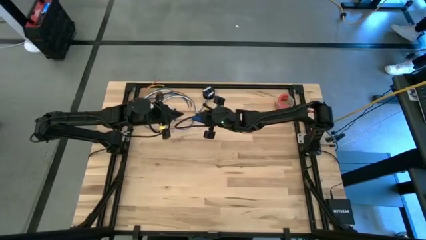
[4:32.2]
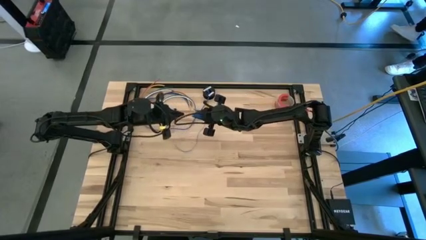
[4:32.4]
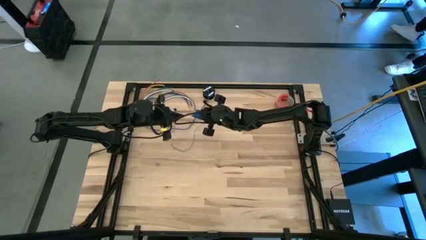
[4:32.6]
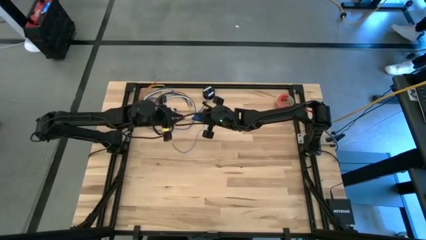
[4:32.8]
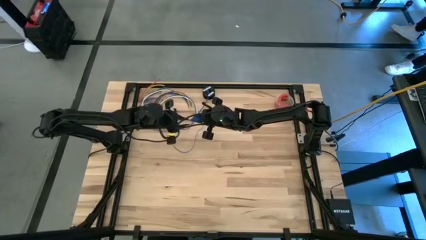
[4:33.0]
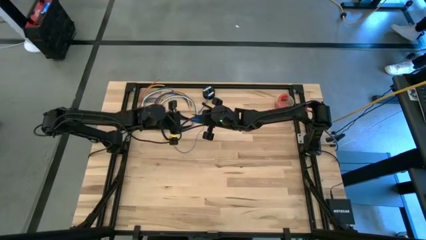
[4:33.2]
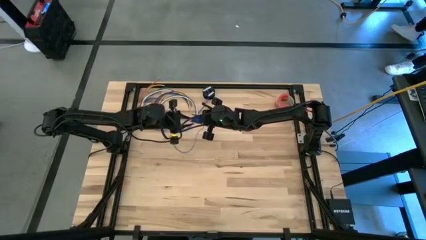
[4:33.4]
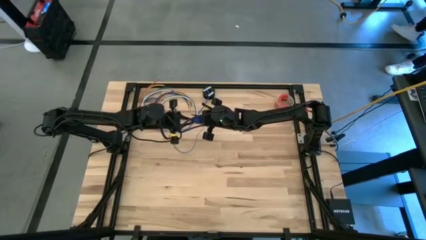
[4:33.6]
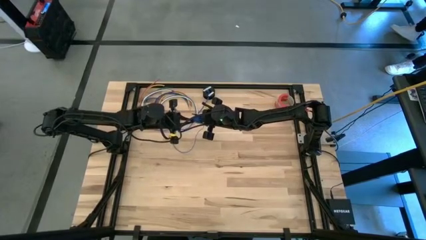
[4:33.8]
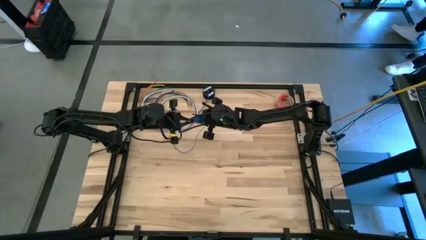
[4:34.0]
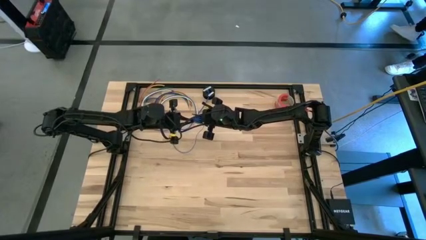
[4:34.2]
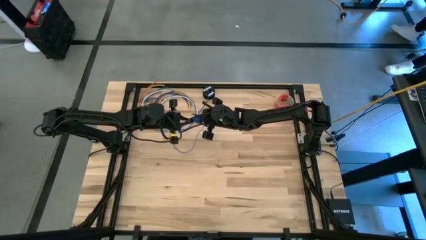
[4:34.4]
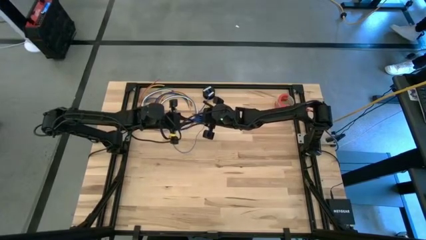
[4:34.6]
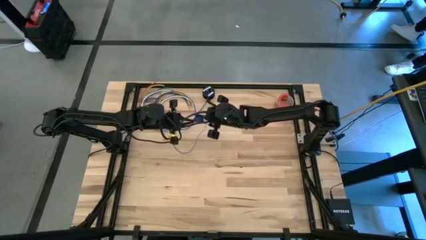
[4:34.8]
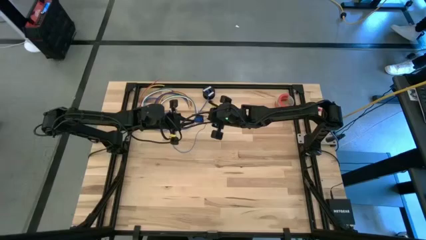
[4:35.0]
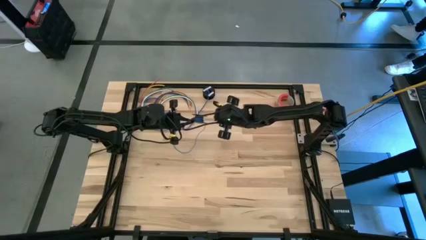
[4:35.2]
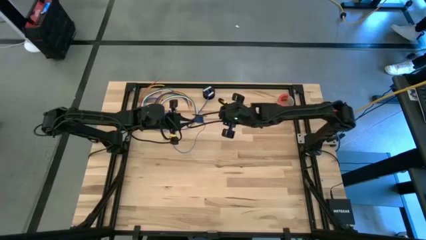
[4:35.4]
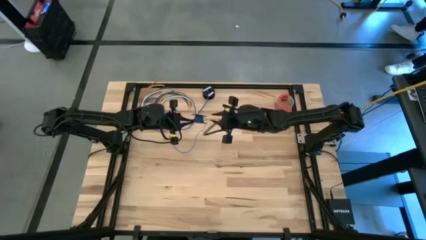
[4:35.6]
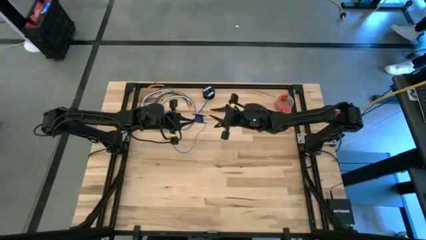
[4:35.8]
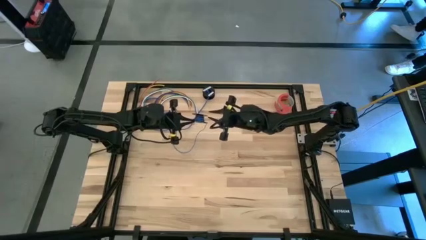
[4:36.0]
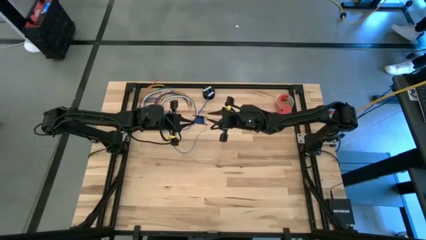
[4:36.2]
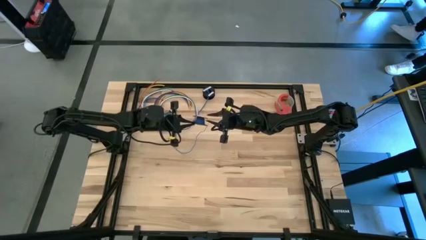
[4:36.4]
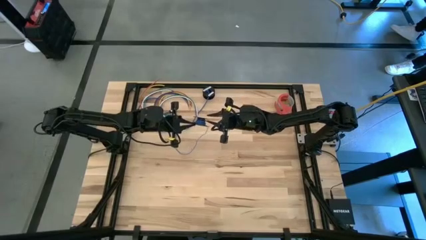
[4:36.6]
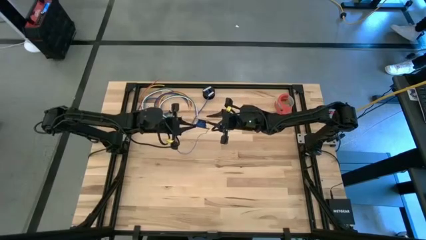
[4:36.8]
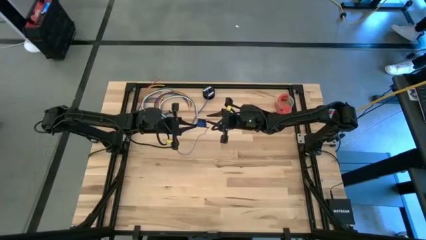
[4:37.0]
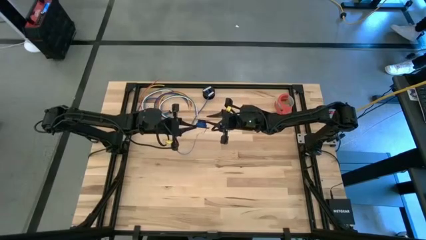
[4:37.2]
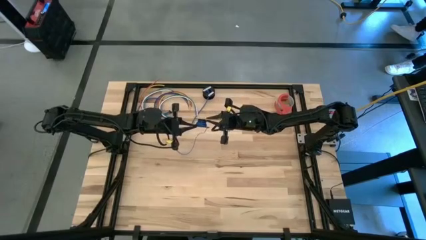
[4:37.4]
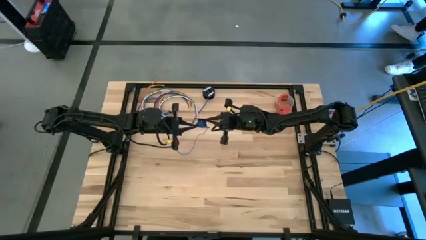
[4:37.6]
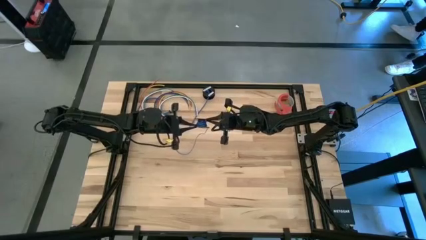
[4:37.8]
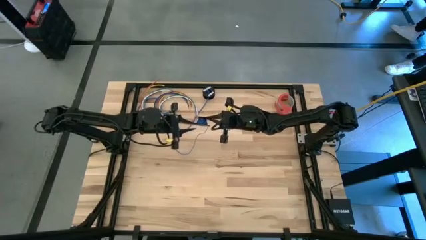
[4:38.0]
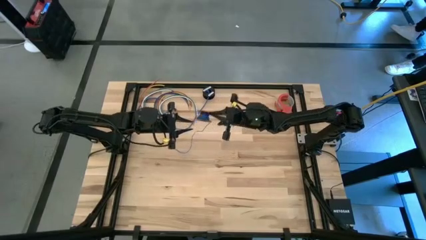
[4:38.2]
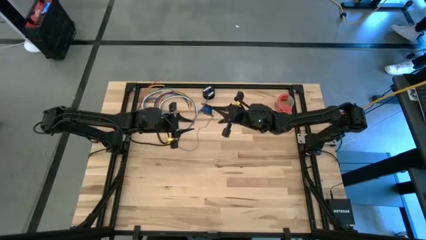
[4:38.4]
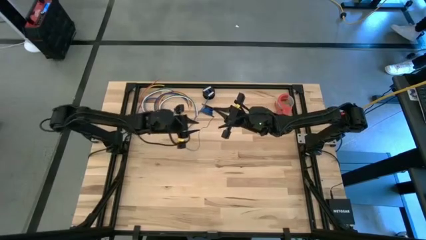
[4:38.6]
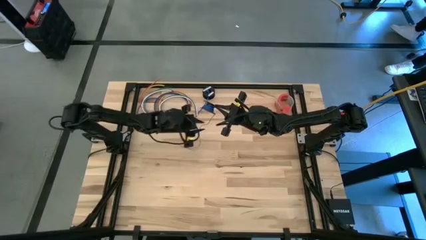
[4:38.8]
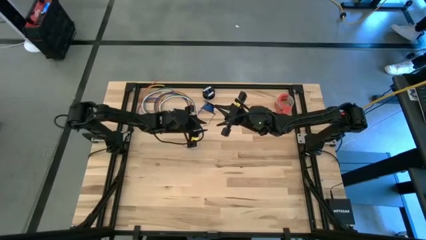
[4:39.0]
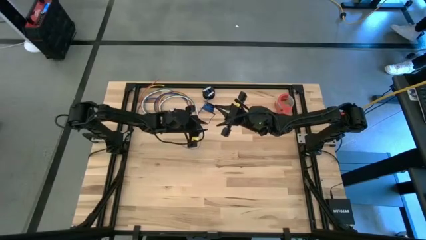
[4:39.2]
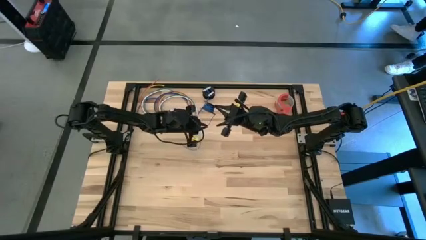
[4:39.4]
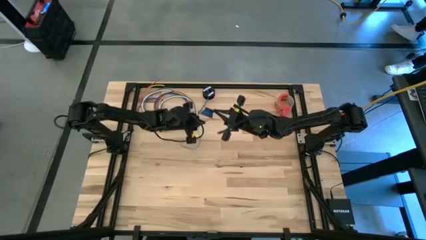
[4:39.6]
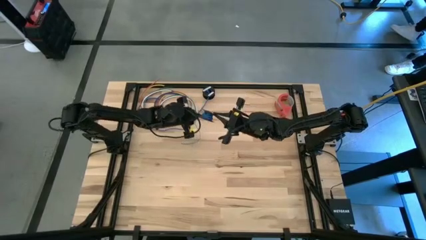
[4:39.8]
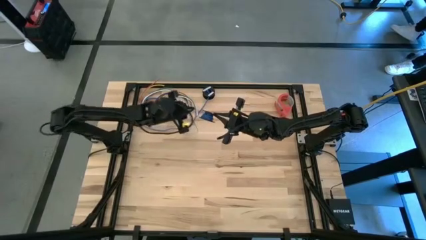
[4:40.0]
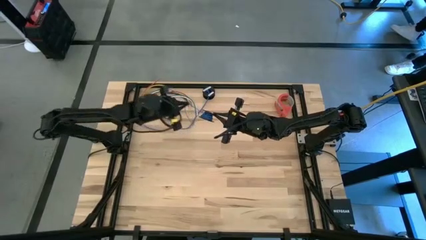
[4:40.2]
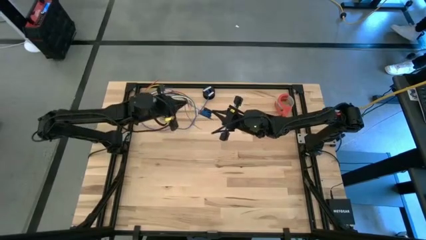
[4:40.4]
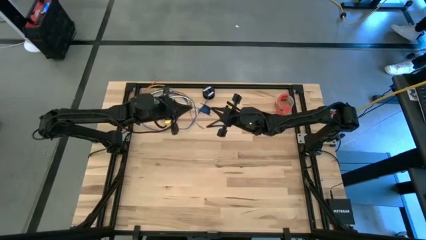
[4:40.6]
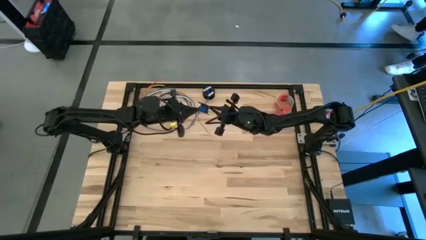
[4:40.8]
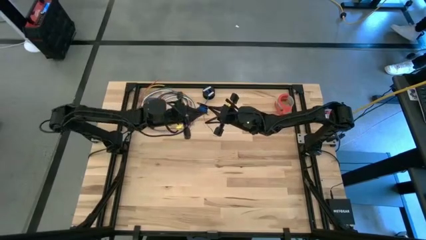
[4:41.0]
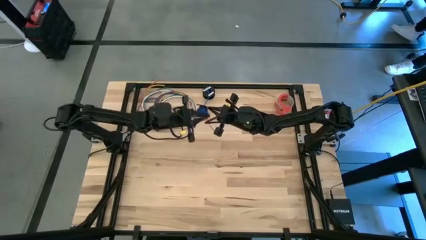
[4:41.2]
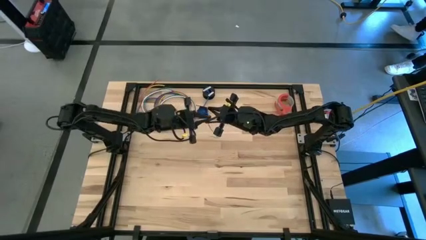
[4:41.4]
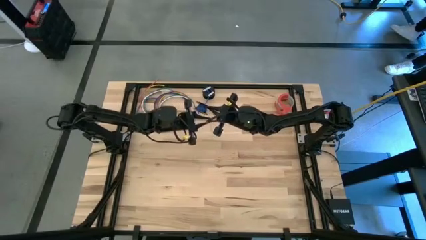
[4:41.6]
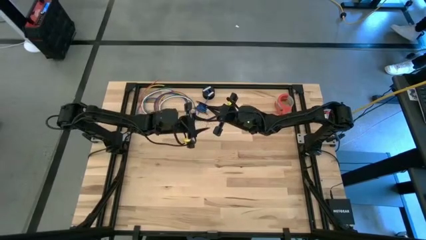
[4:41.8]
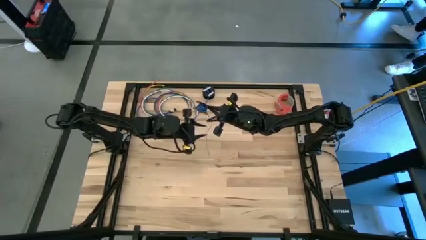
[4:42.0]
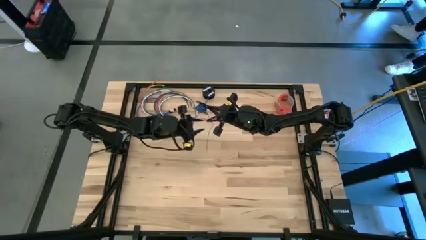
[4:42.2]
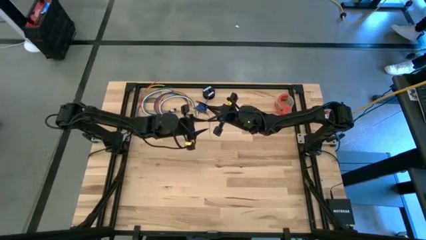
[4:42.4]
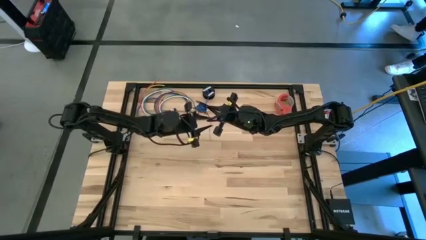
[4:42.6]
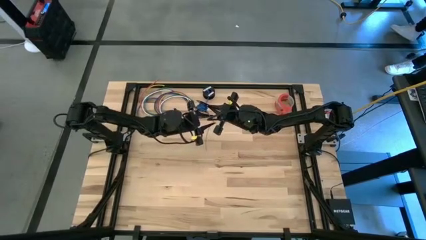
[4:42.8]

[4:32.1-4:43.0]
Task: Coil cords
Coil the blue wire onto the black spool

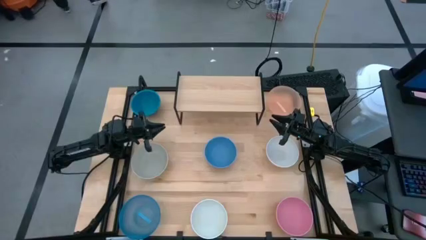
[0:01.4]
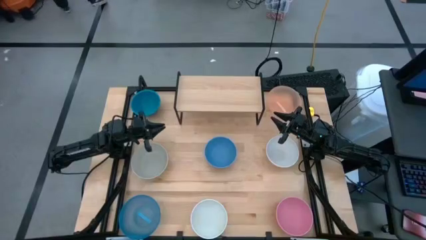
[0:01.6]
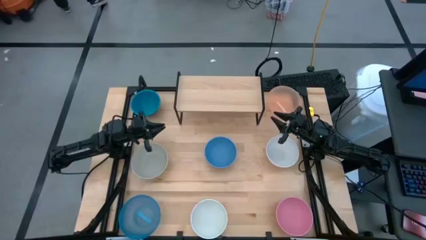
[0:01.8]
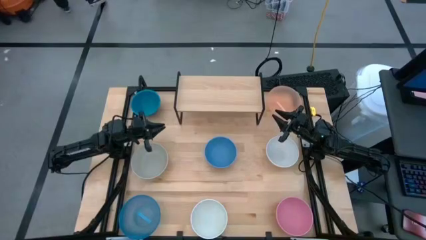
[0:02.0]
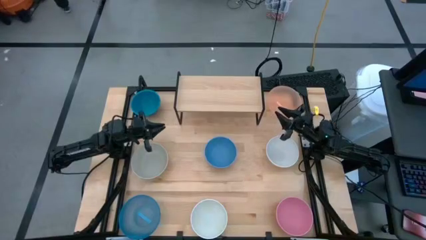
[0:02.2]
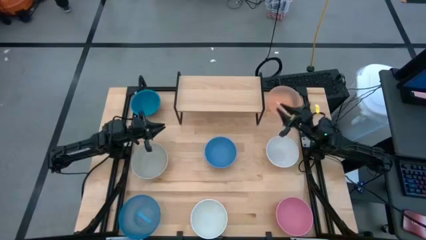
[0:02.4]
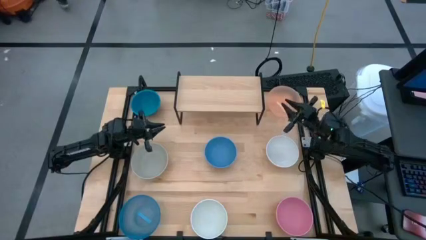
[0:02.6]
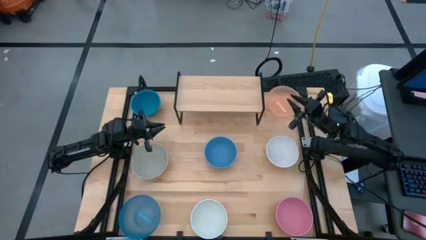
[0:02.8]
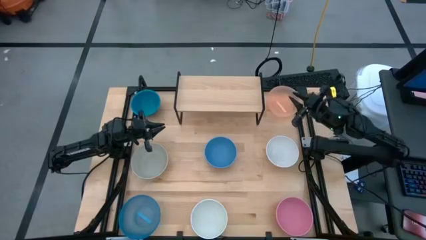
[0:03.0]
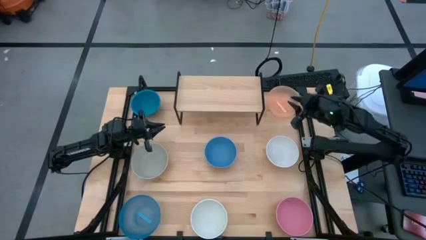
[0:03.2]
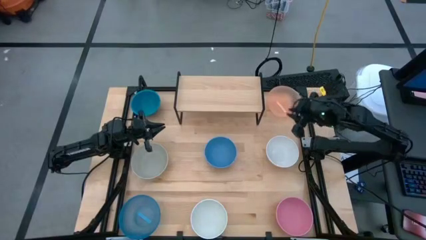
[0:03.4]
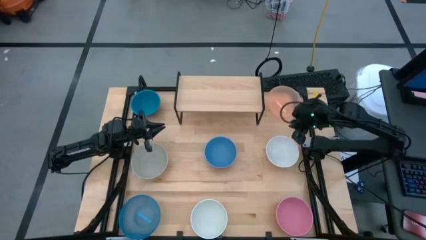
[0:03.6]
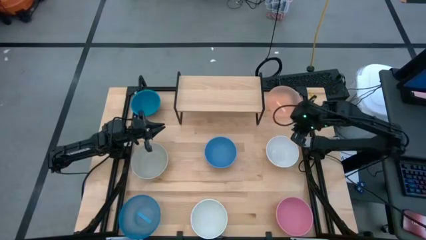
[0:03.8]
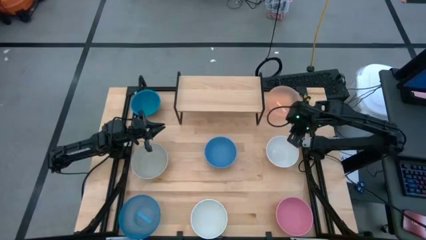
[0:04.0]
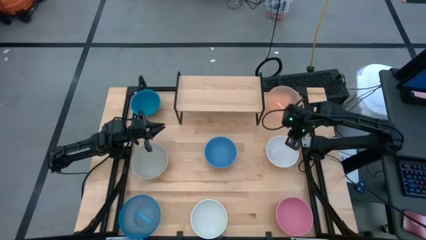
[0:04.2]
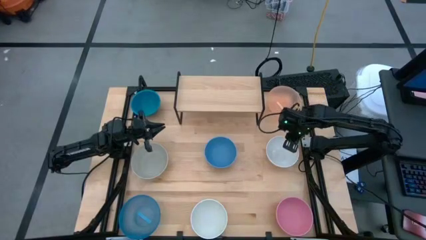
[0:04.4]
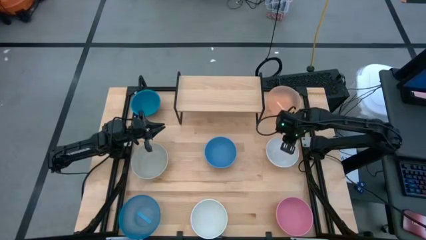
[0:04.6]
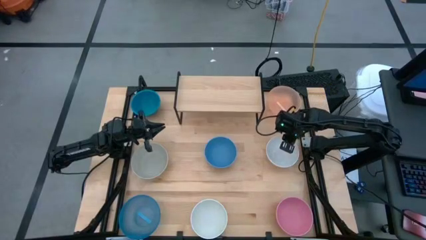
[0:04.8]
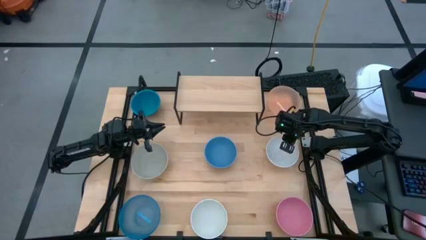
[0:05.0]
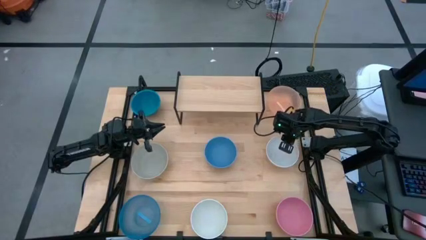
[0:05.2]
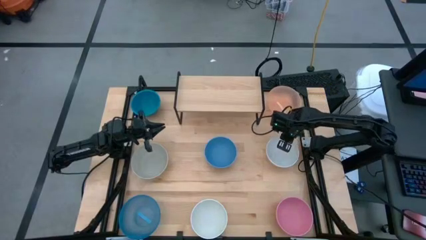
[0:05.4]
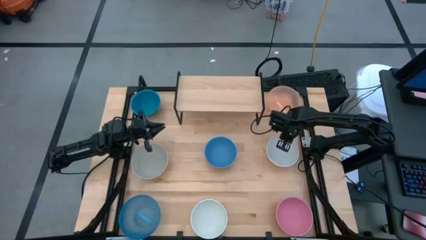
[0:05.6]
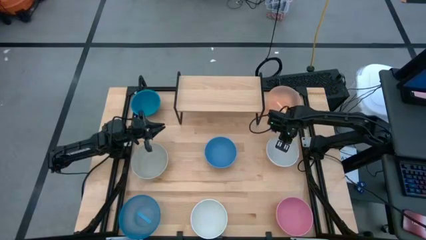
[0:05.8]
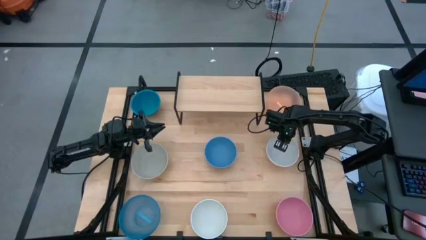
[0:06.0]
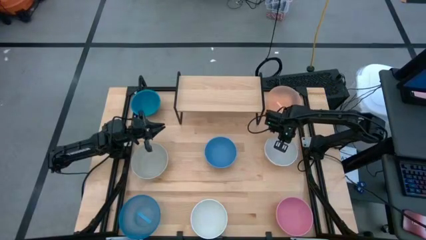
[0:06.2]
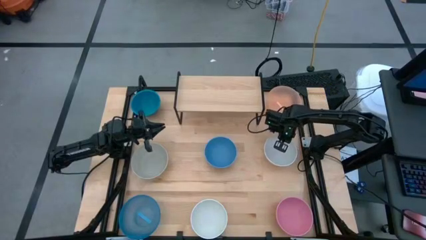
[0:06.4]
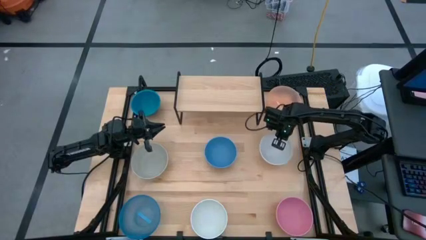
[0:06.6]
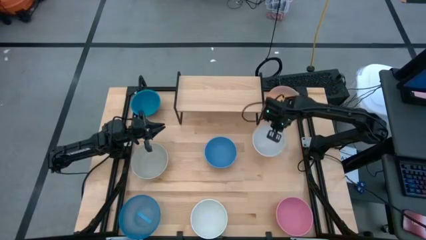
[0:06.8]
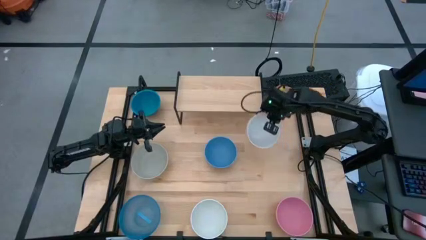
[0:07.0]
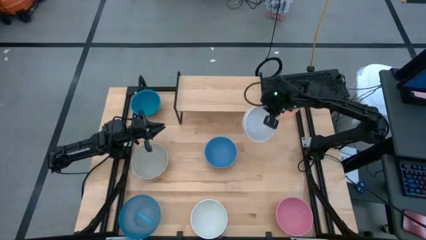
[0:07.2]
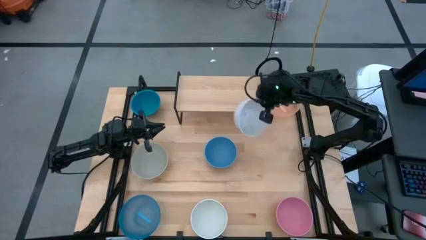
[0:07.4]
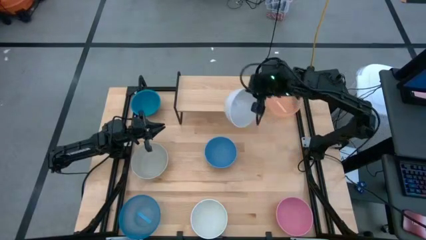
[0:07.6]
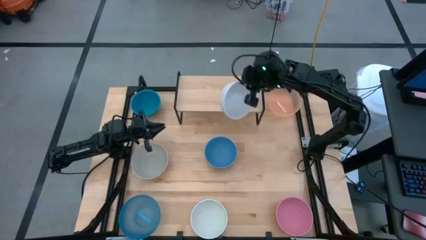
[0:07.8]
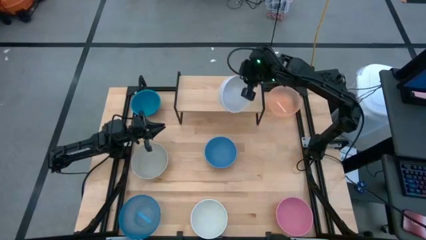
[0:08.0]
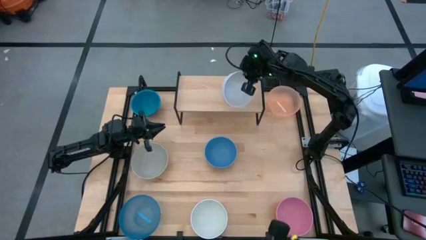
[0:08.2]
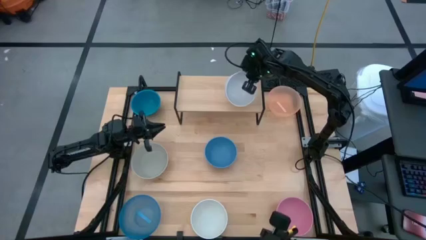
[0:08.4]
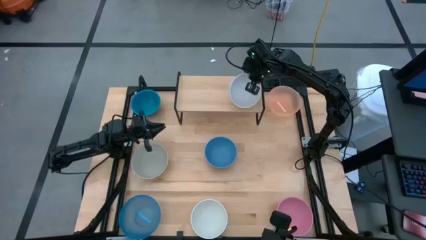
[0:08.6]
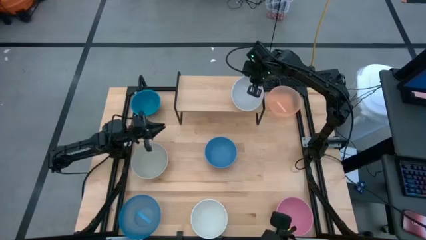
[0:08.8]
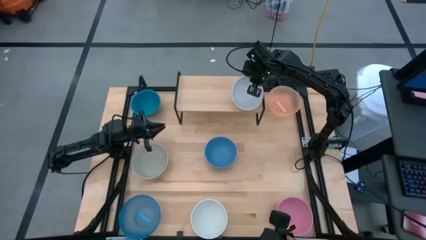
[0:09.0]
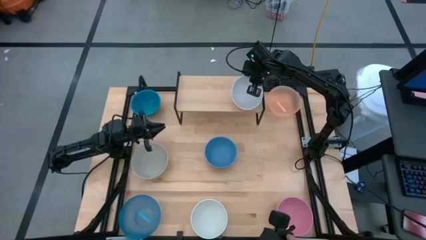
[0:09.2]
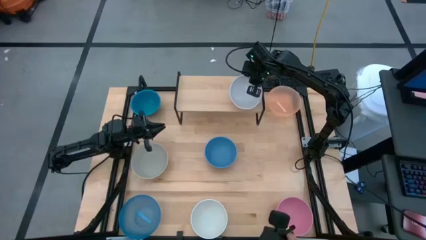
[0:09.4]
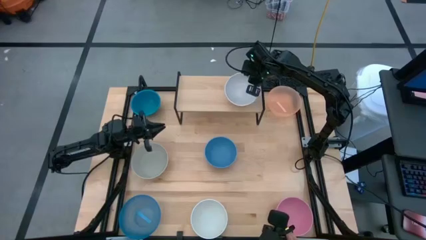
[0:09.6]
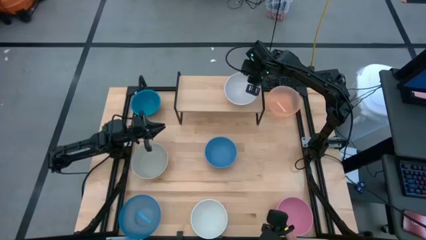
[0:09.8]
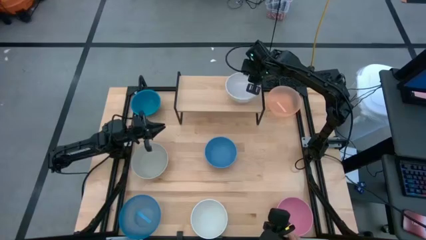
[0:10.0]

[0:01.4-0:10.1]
Task: Place and stack bowls onto a shelf
Put the top white bowl on the shelf
